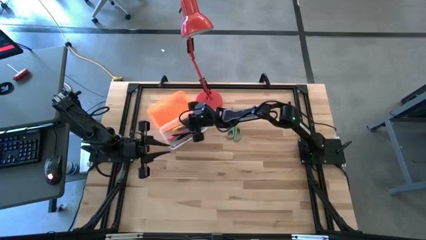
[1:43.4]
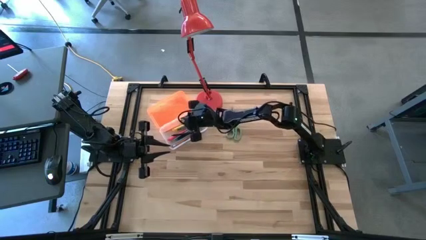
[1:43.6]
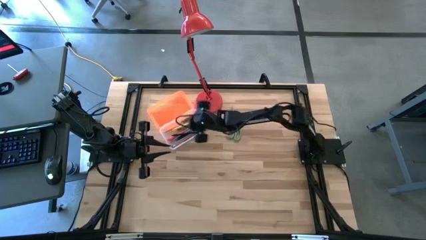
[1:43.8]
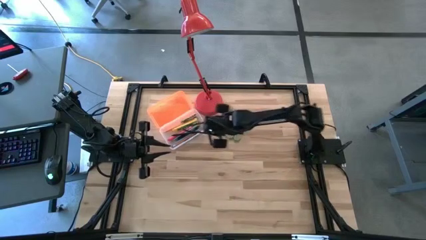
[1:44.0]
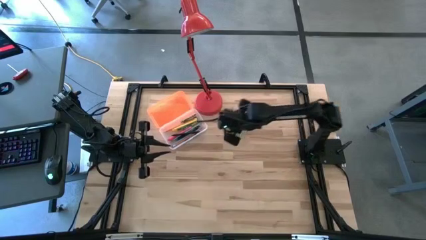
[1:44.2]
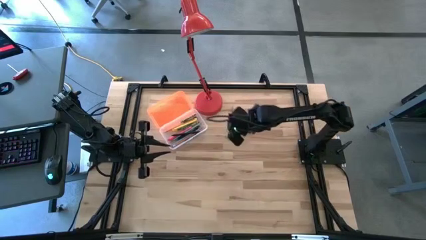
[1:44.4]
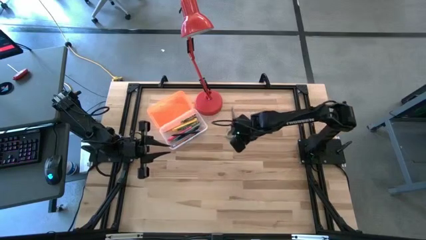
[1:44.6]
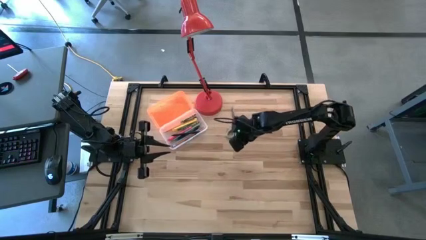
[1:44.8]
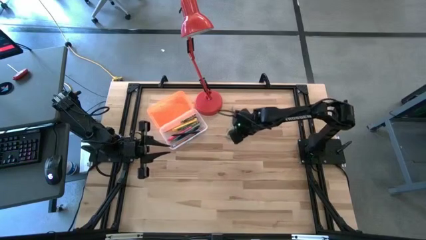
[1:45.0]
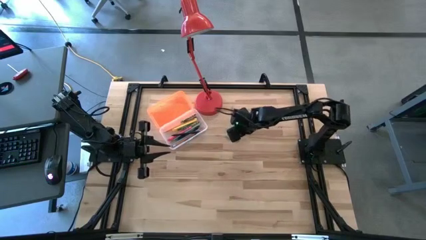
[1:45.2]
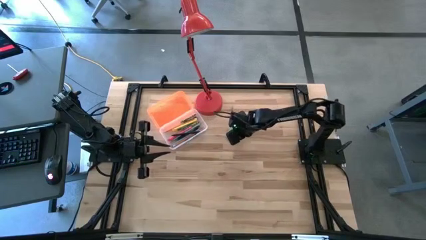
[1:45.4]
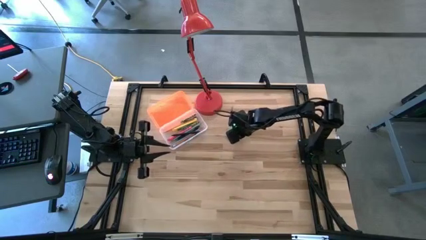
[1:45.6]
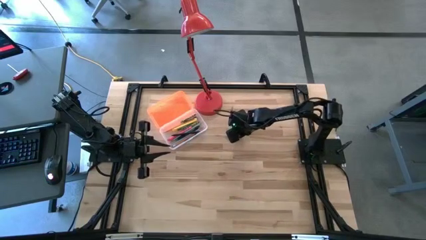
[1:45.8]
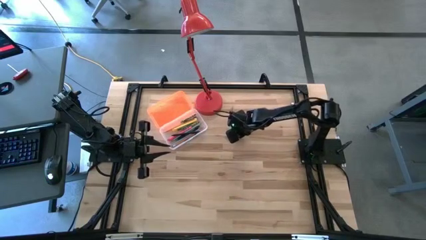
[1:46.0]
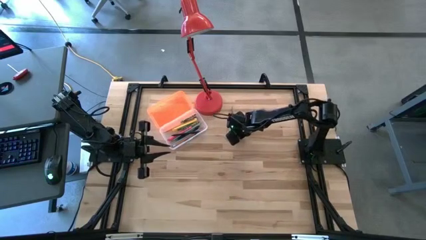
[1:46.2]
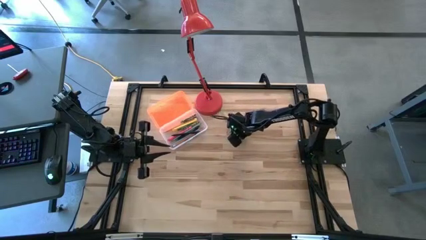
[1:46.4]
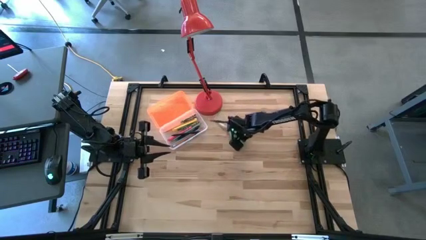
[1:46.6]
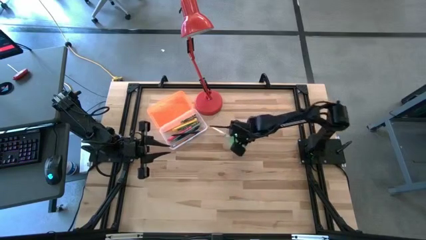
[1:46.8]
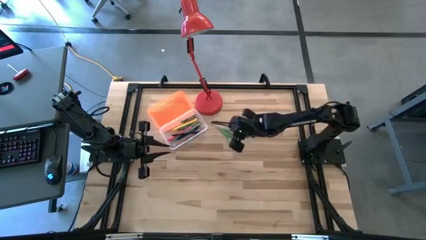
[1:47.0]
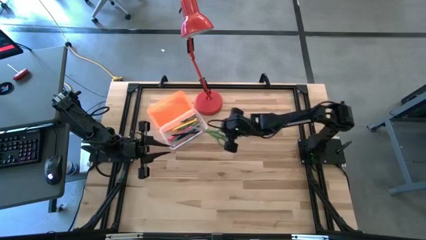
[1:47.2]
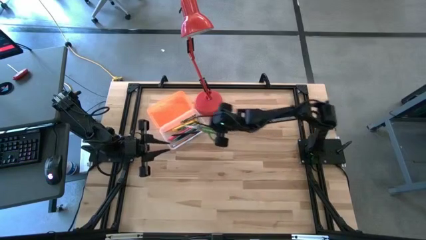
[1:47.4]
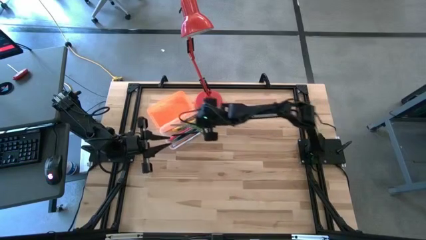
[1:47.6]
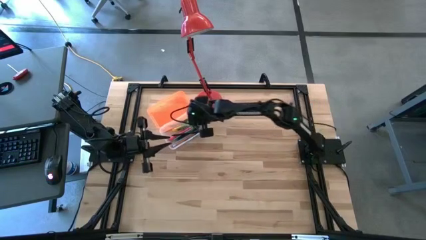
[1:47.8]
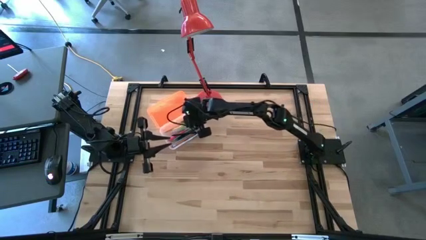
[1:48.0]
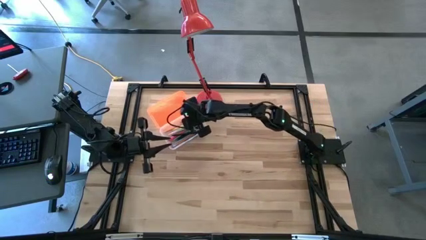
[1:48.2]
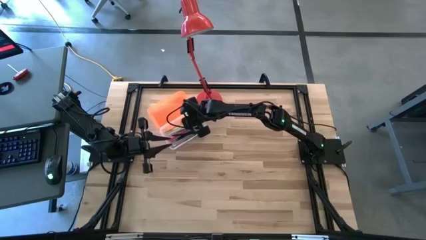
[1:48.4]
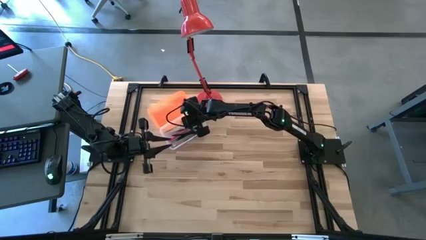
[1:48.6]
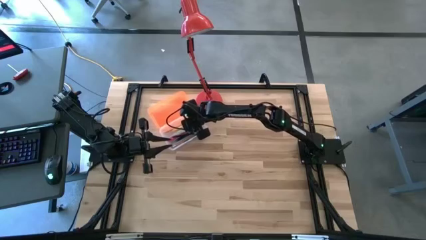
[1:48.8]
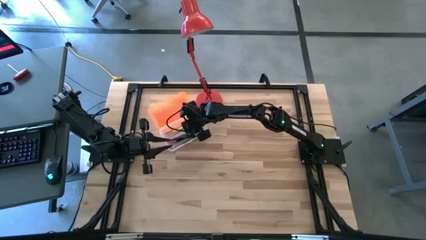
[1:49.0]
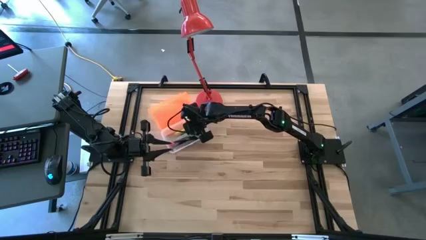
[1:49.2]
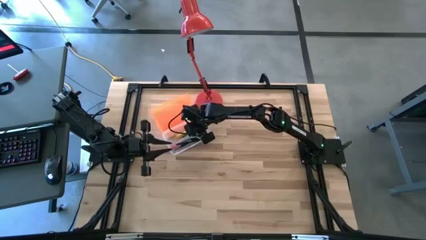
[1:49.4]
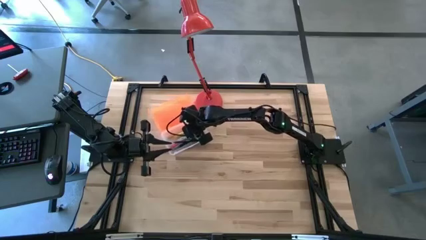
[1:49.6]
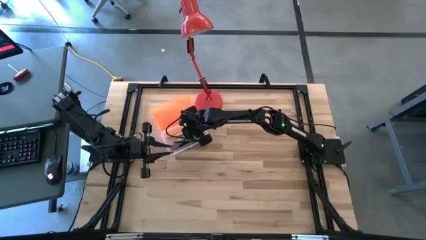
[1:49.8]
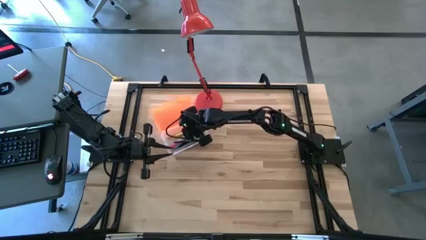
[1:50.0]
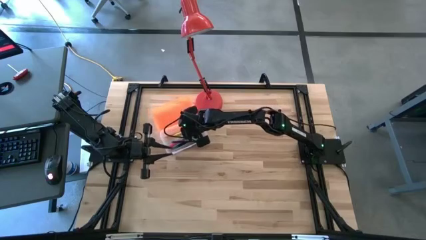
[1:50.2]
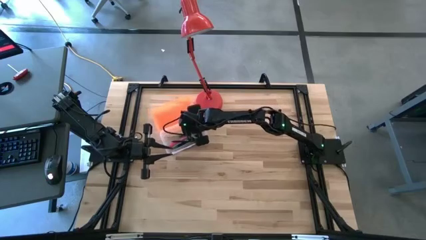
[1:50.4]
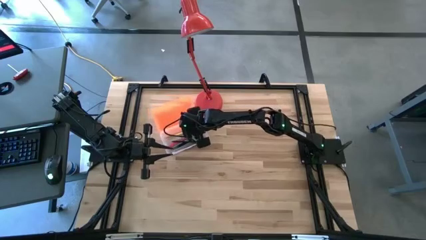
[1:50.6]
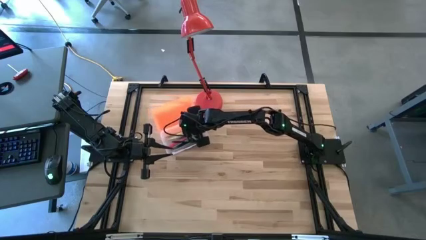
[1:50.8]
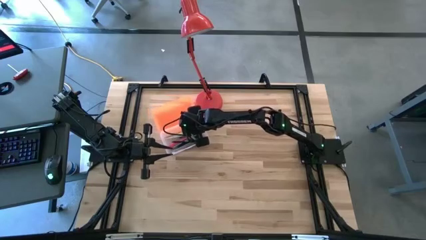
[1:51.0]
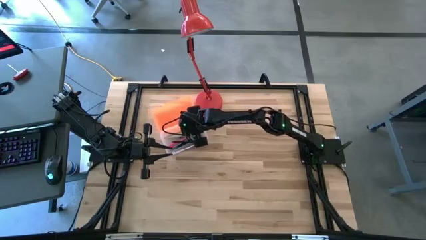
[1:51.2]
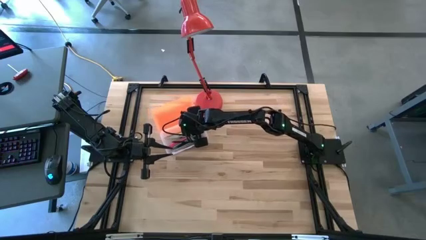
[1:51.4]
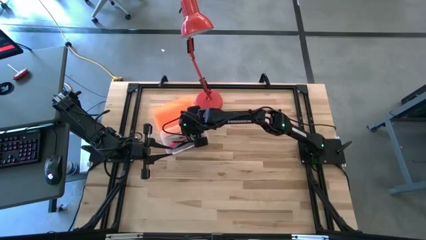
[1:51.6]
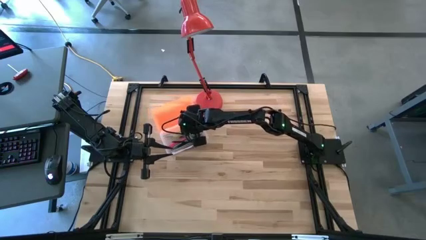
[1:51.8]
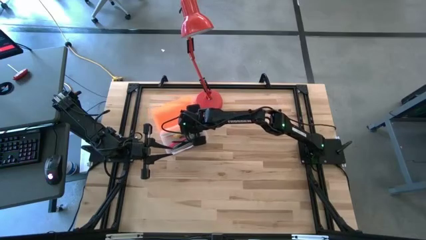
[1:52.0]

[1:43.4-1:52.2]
Task: Pick & place school supplies into a supply box
Put the green scissors into the orange supply box

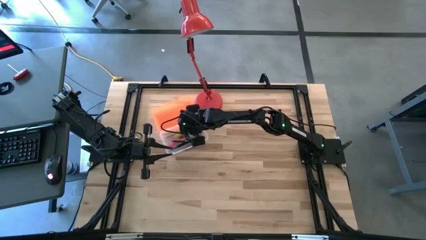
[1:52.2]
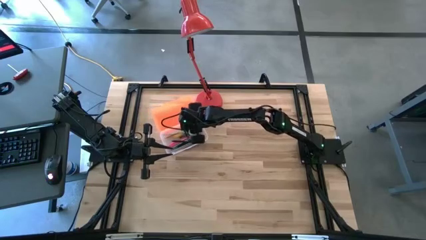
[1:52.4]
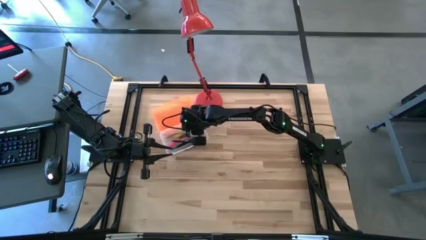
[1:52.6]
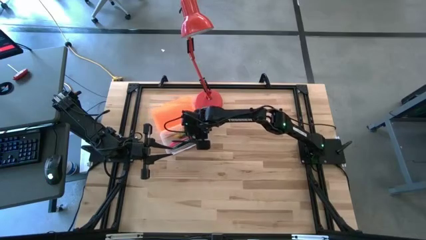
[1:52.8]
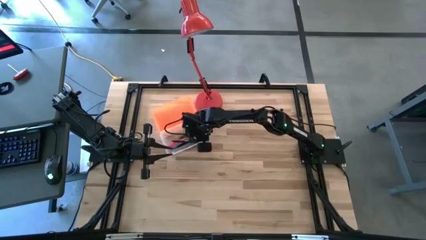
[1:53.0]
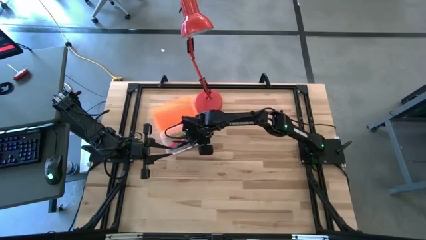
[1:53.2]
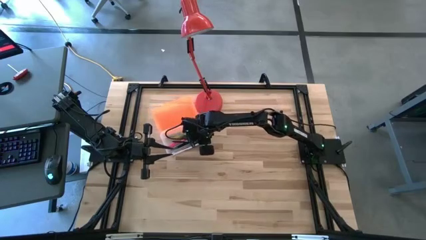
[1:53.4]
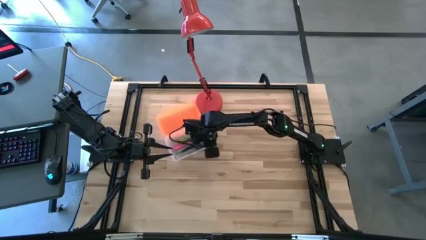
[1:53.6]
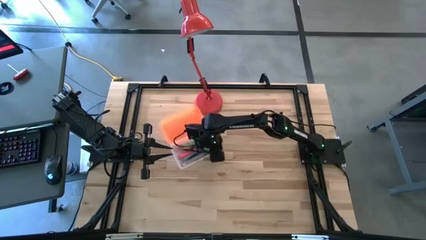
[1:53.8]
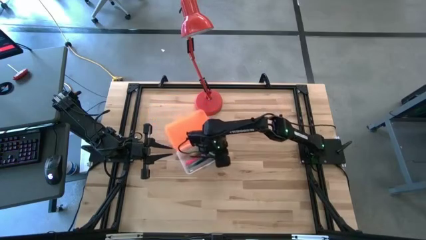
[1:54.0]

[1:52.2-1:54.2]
Adjust the orange supply box

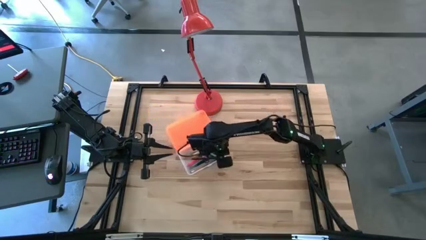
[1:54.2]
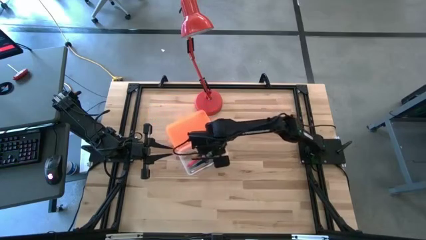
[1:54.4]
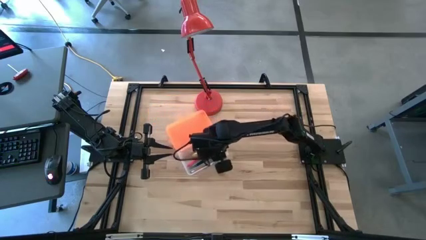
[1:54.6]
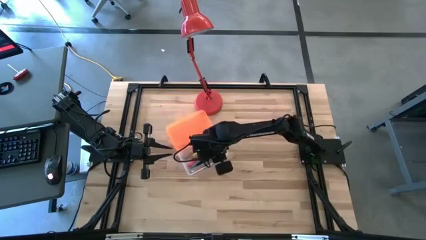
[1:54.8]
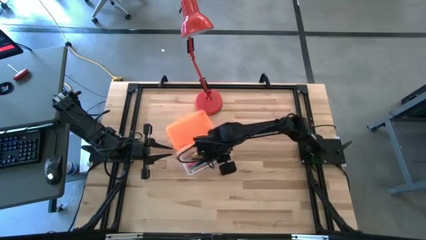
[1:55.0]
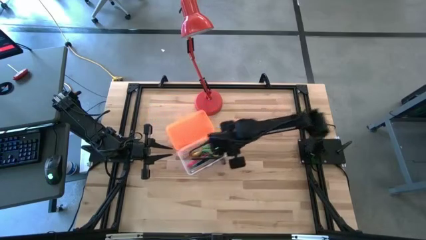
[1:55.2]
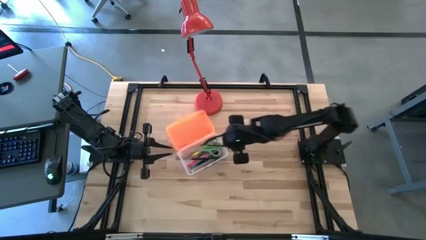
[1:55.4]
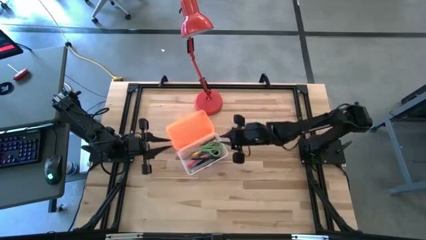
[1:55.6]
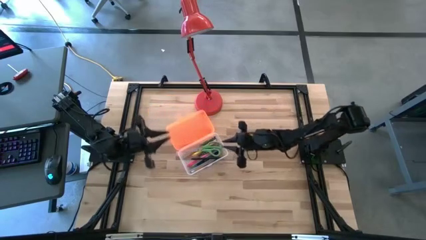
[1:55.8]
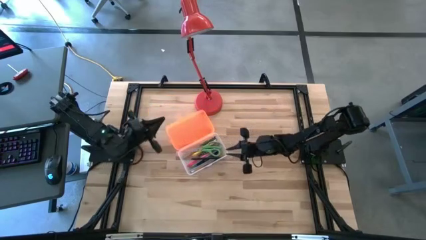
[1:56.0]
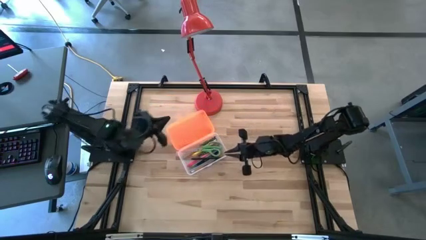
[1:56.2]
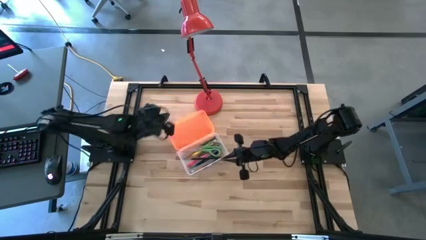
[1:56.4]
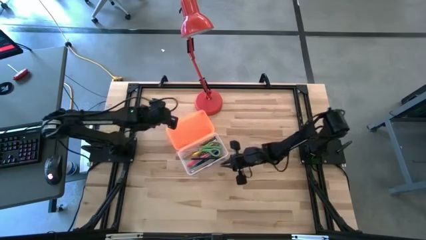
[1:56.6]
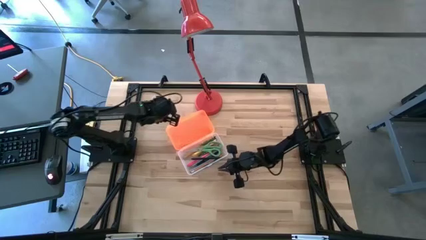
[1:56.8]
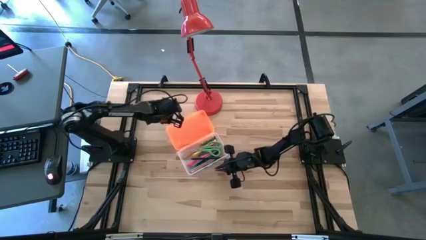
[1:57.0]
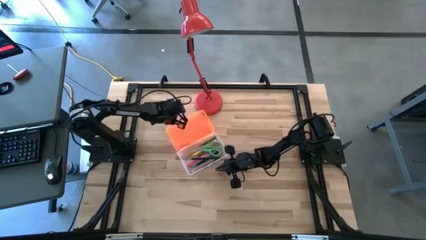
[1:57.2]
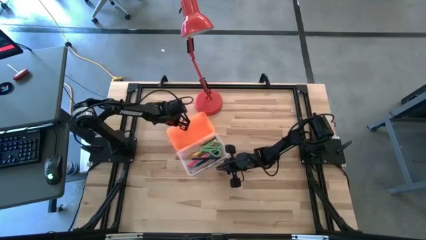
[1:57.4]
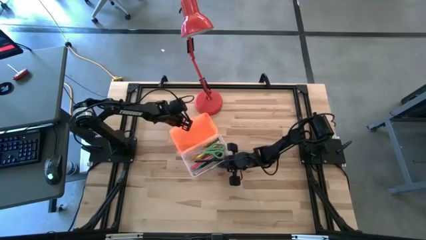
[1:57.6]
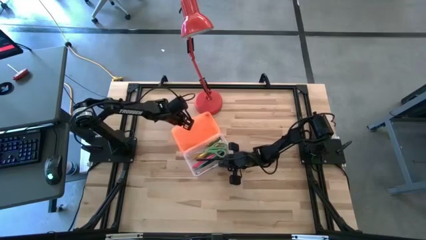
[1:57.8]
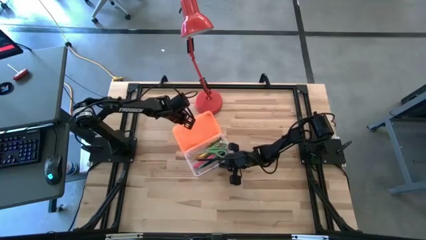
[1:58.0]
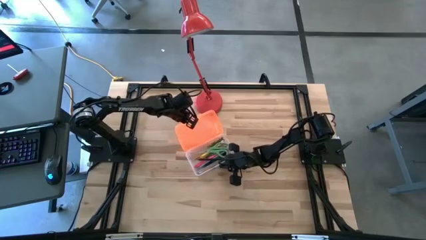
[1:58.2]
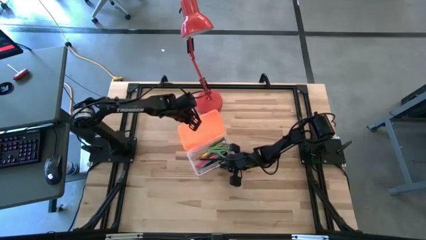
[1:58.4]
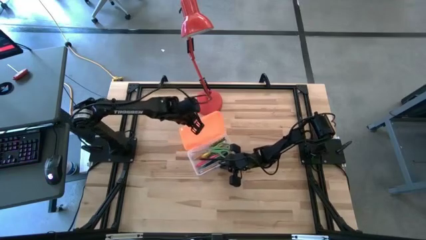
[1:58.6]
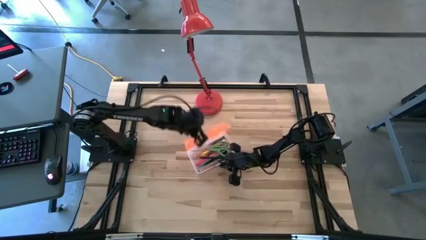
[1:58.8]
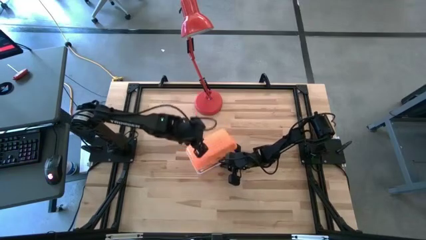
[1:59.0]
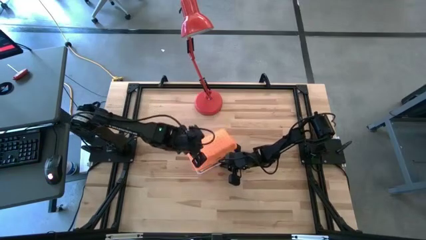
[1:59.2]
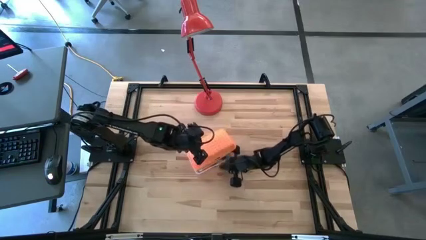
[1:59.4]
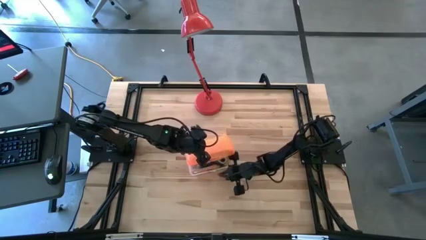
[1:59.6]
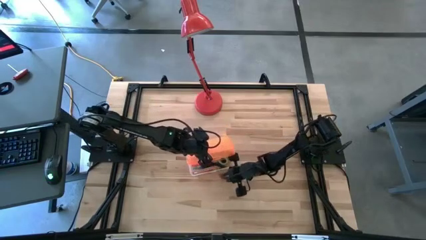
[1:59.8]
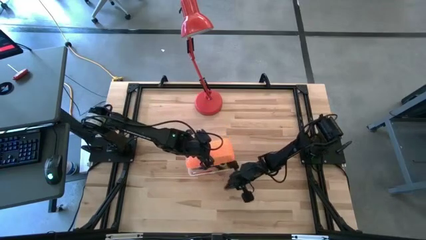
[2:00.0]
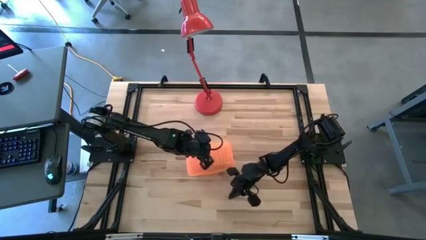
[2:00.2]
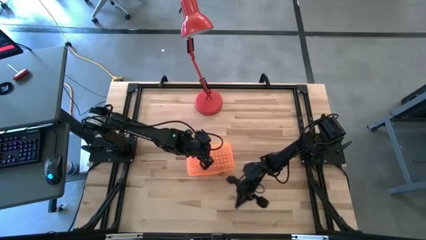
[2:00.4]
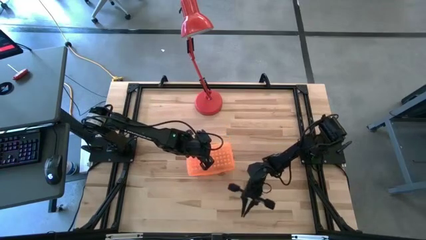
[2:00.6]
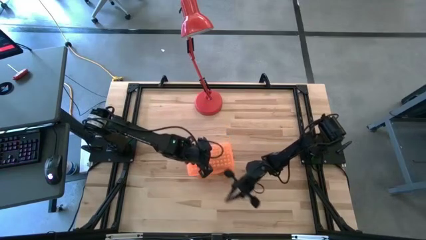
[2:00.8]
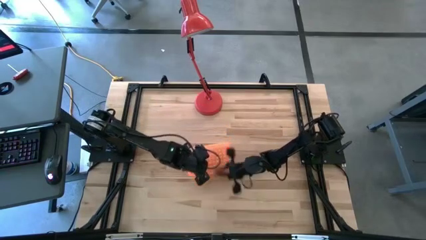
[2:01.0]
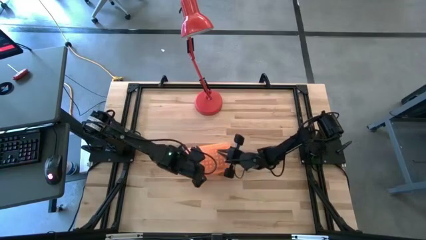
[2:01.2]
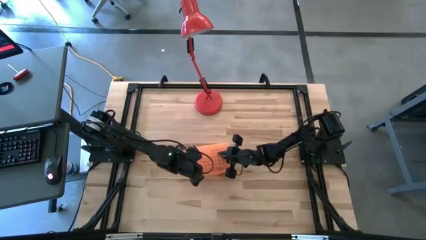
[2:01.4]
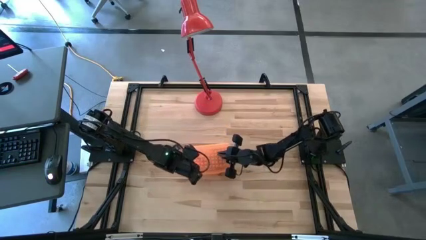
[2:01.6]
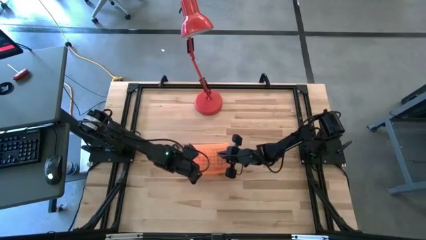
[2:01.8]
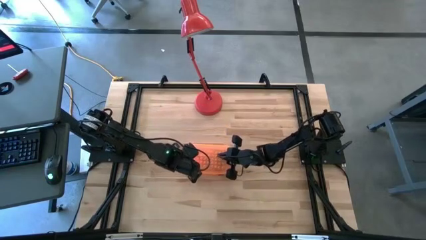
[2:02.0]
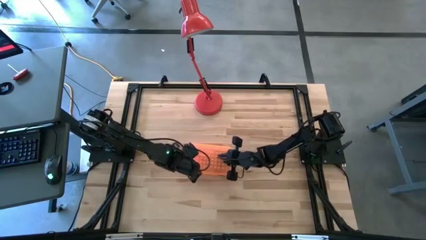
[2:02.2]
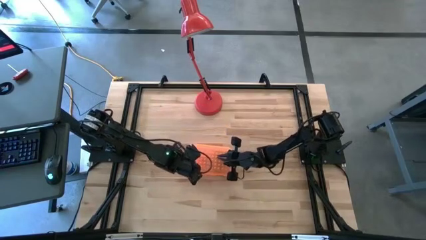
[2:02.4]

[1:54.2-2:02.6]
Close the orange supply box
